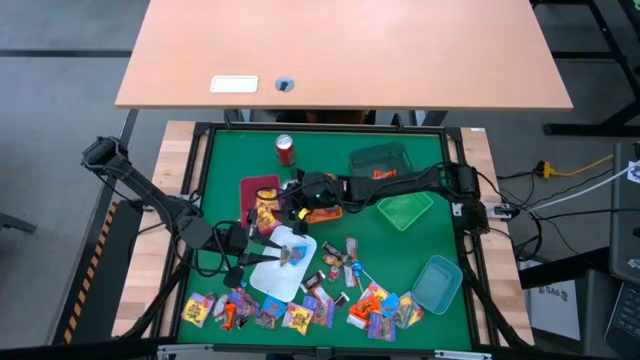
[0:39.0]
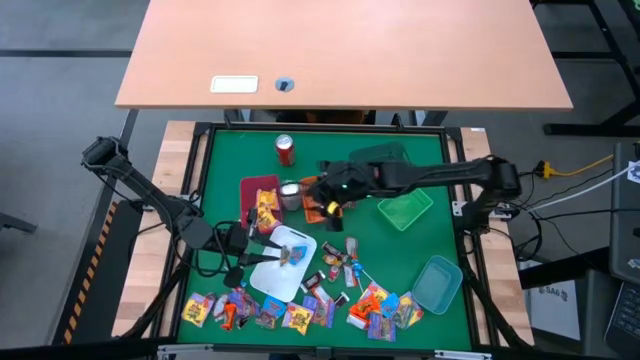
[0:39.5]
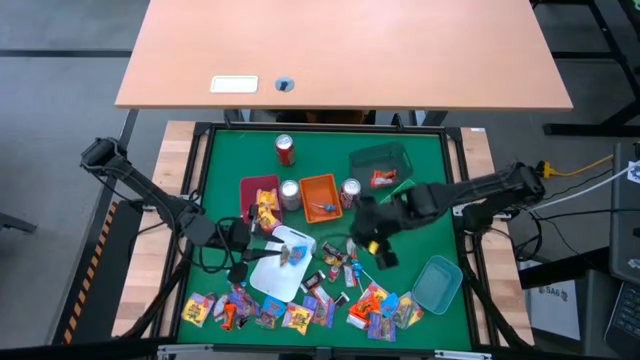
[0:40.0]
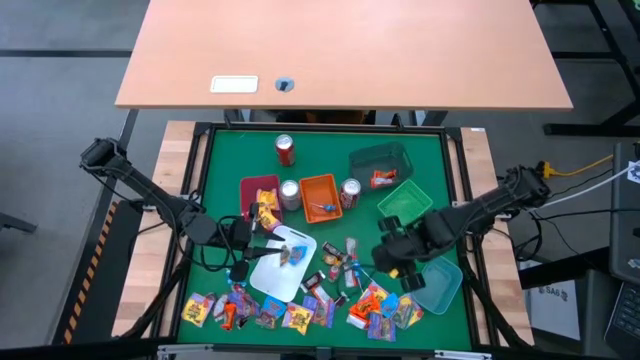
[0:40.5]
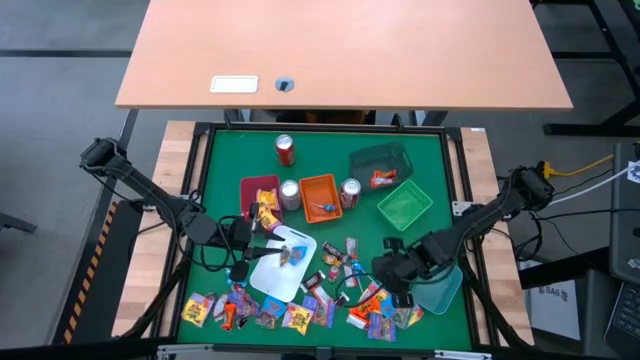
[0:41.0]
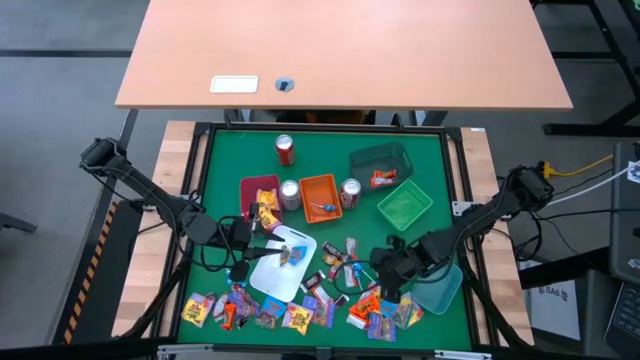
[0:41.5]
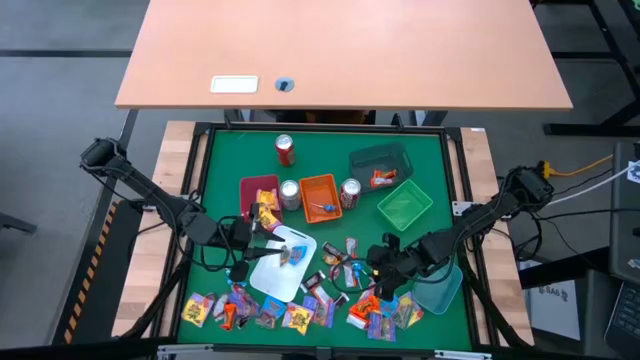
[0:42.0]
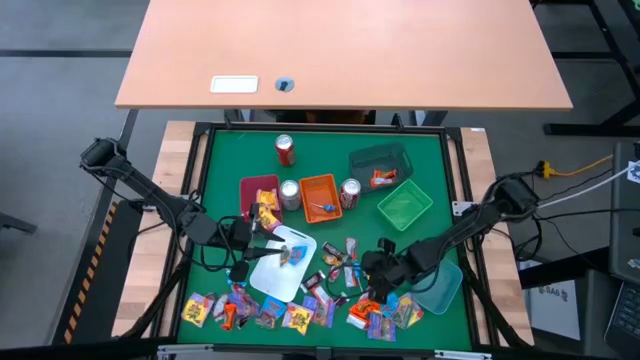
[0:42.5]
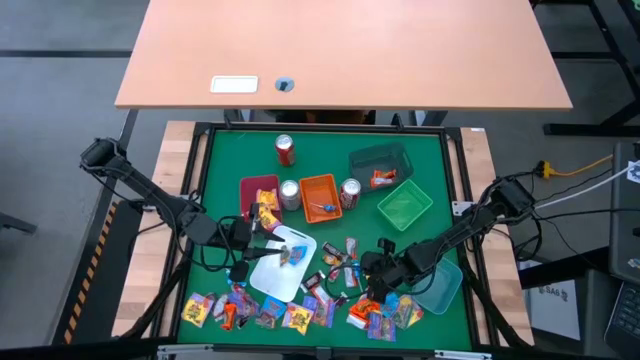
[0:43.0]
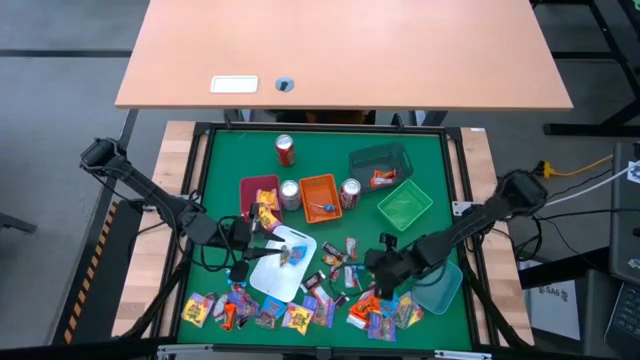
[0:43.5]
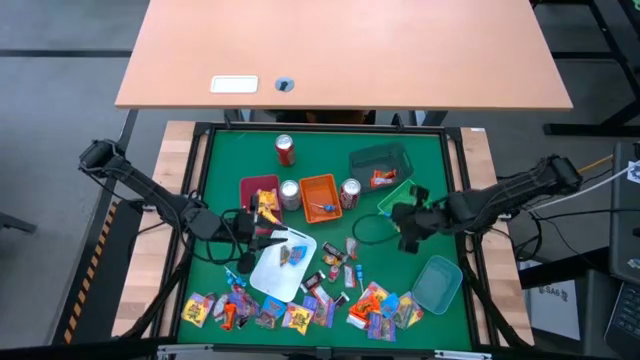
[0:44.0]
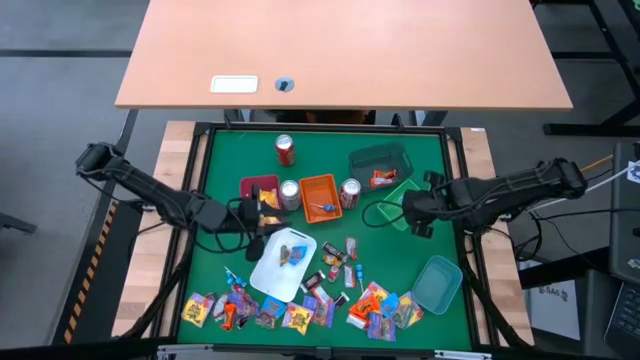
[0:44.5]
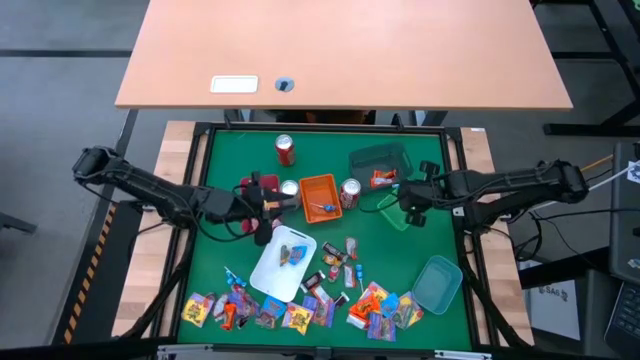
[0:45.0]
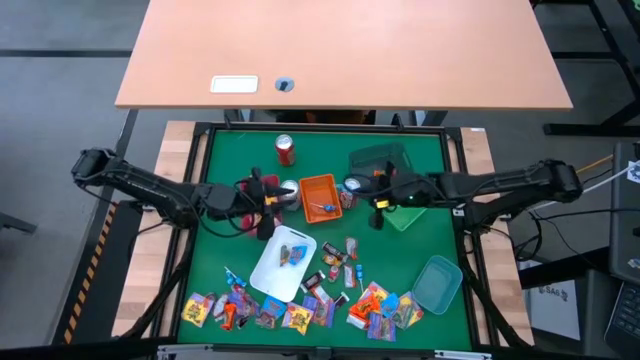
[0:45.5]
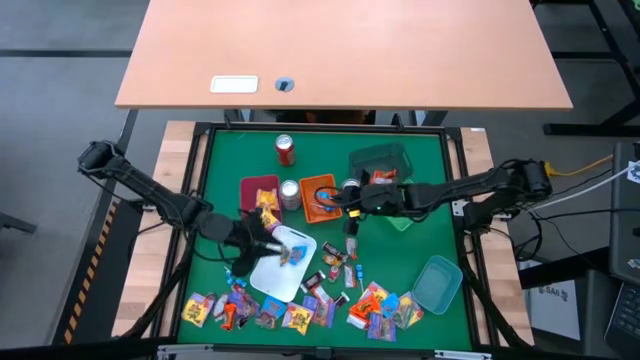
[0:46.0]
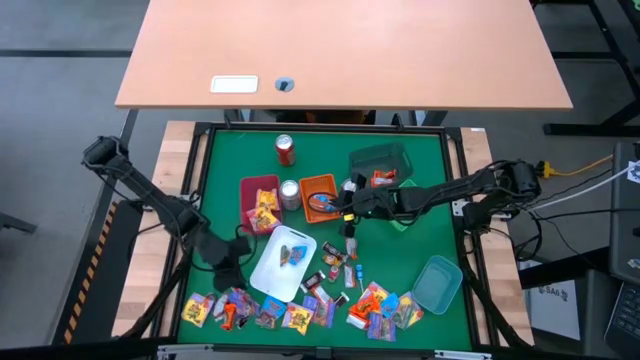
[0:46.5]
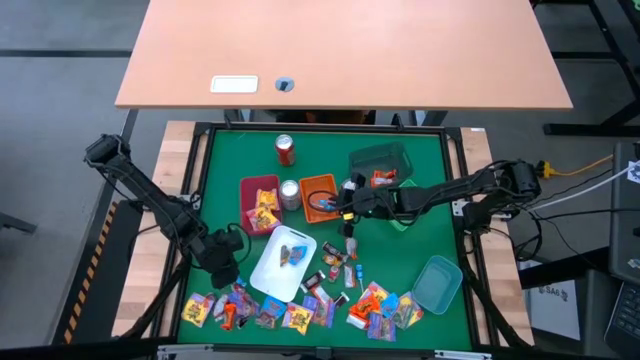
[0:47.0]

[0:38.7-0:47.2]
Task: Sort candy
Put the blue lollipop into the orange bin

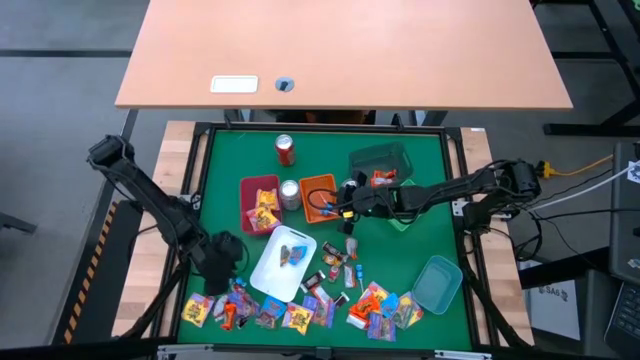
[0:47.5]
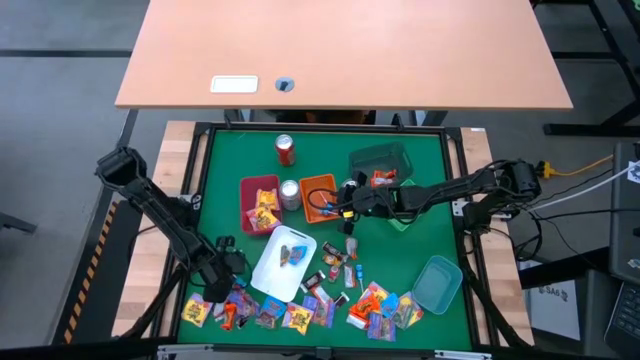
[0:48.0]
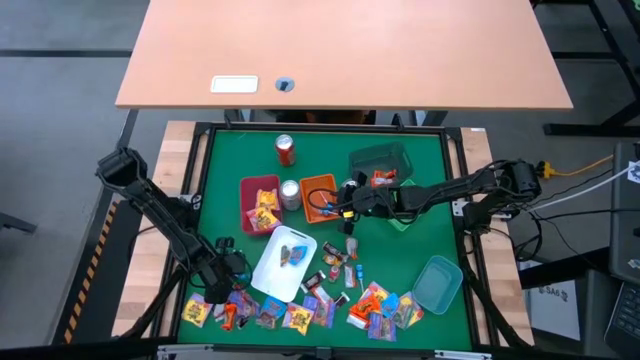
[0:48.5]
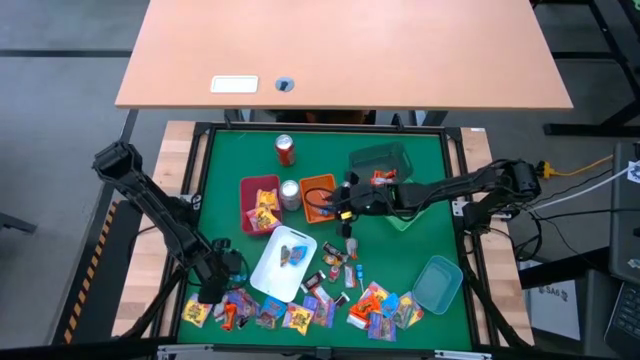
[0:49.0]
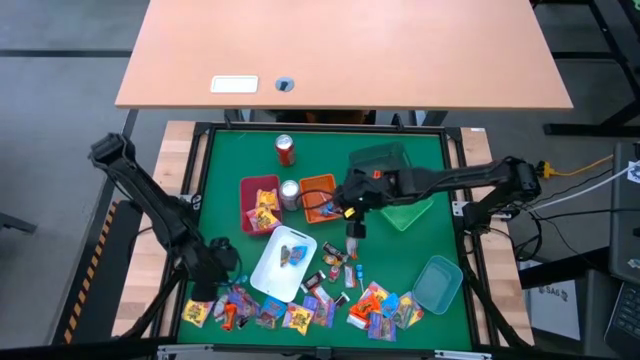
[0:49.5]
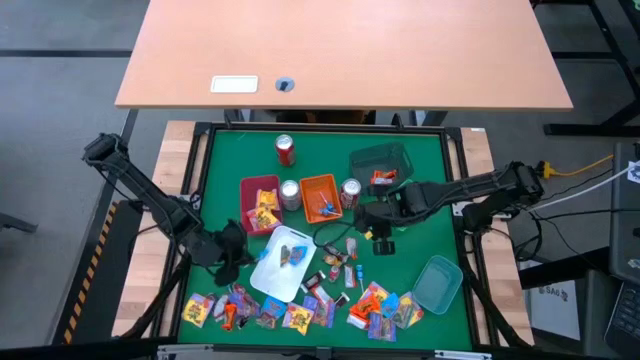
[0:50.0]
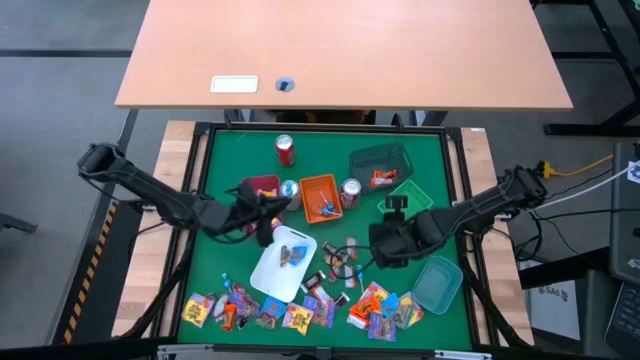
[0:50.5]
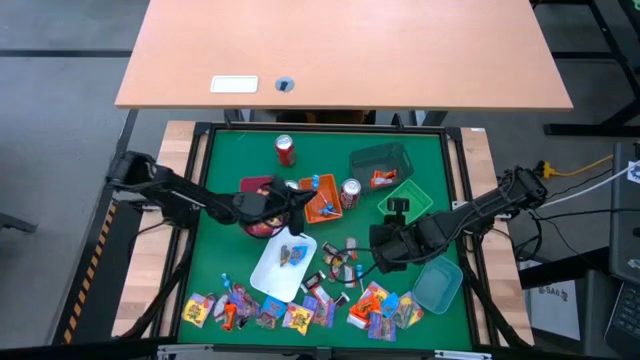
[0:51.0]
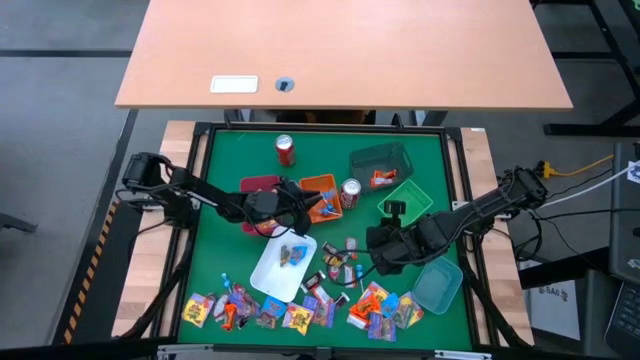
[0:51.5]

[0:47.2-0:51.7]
Put the blue lollipop into the orange bin

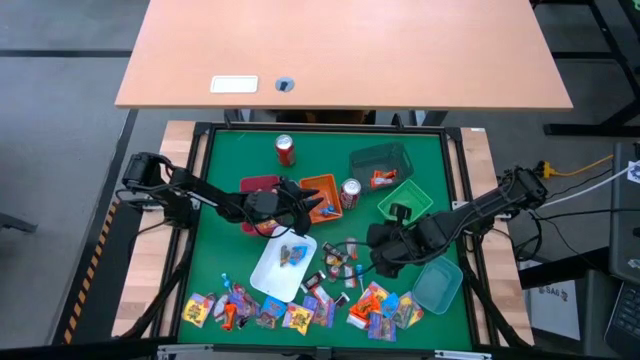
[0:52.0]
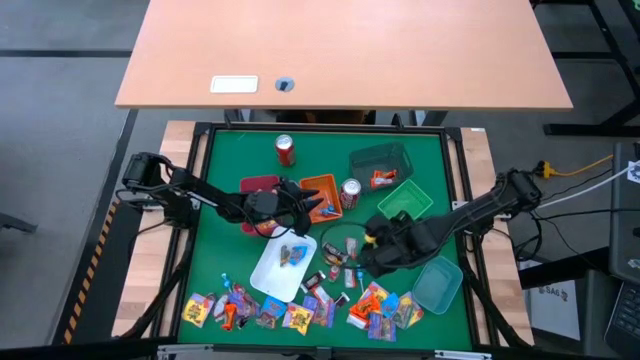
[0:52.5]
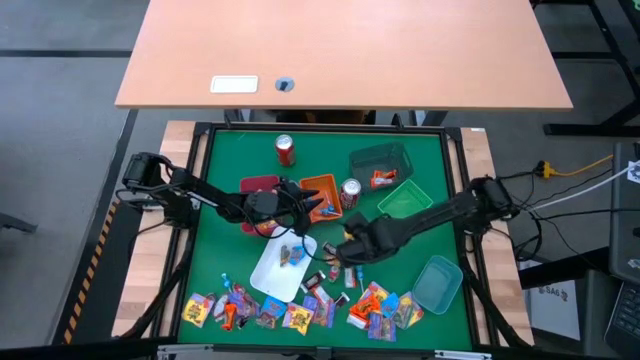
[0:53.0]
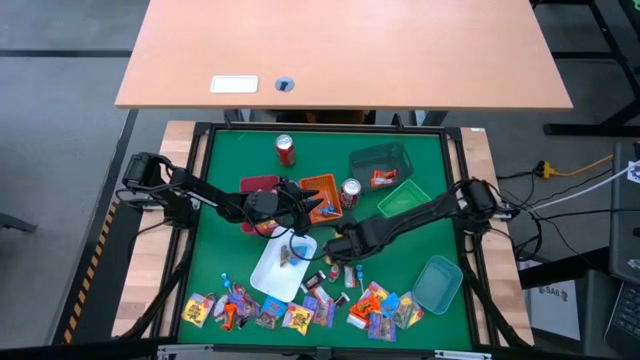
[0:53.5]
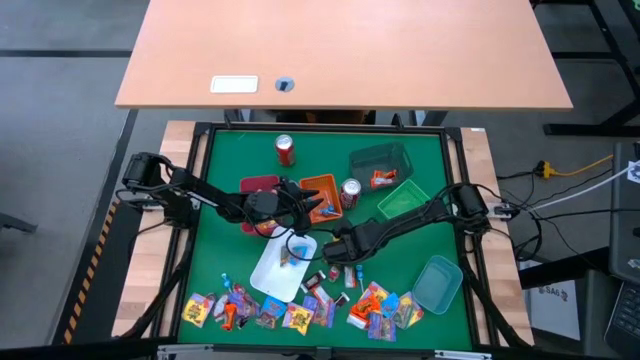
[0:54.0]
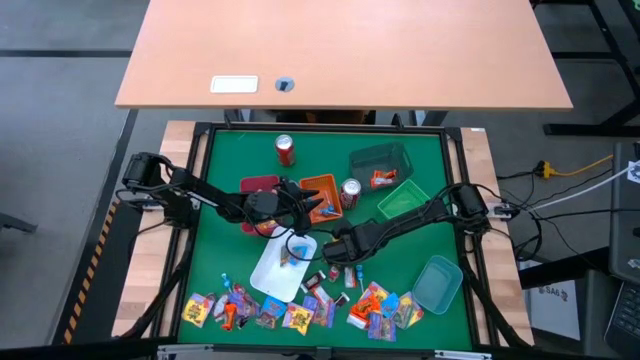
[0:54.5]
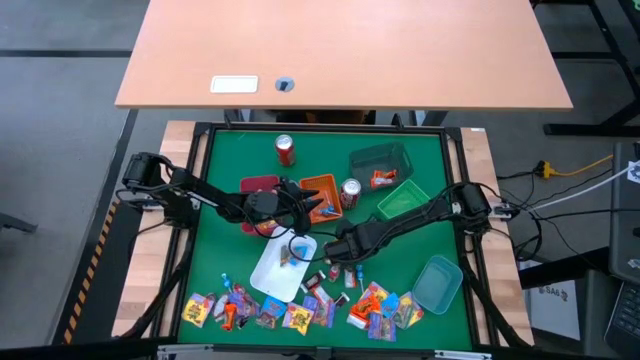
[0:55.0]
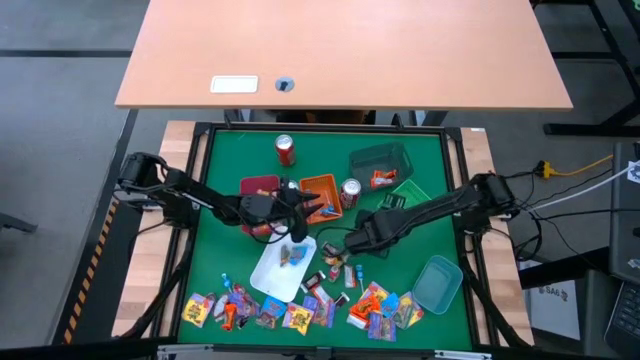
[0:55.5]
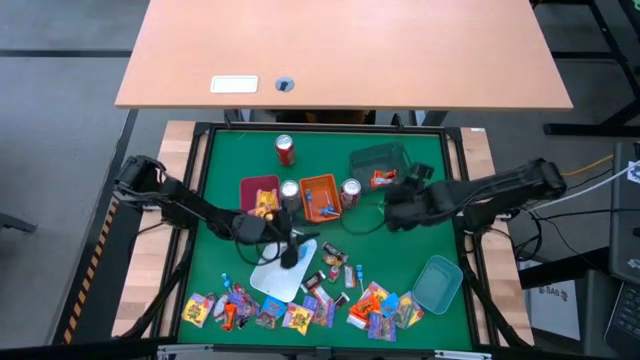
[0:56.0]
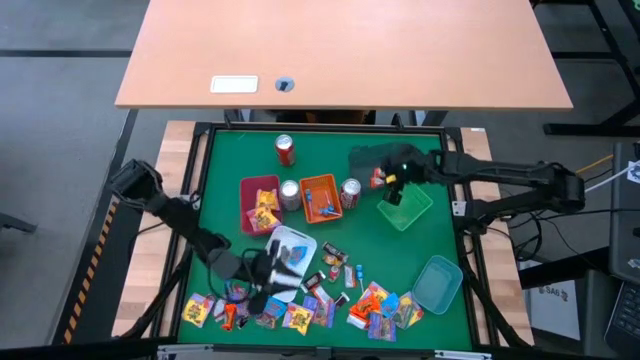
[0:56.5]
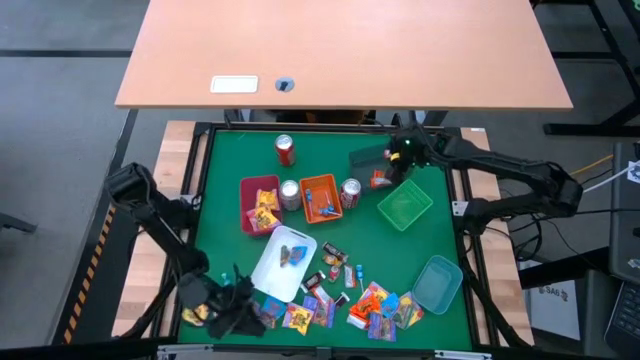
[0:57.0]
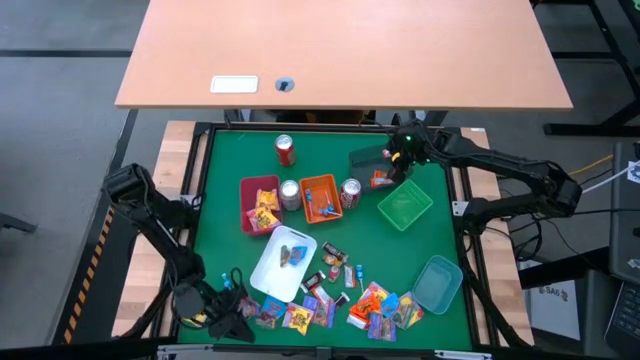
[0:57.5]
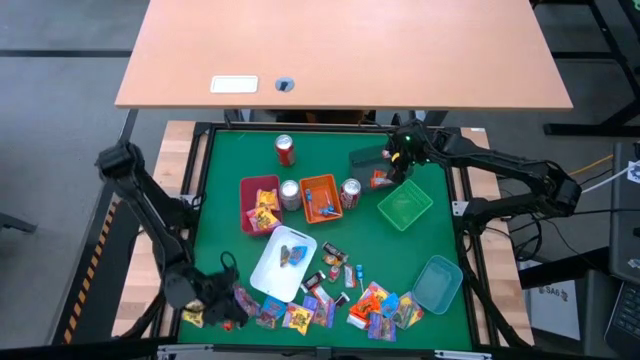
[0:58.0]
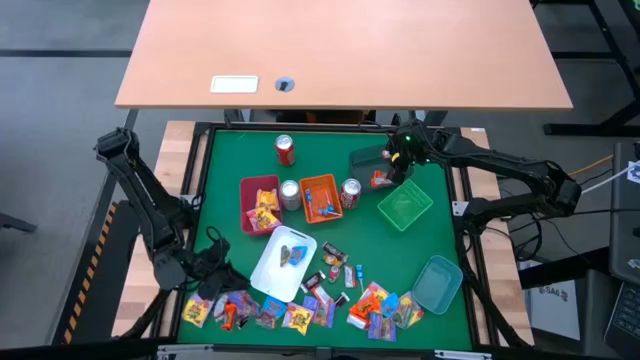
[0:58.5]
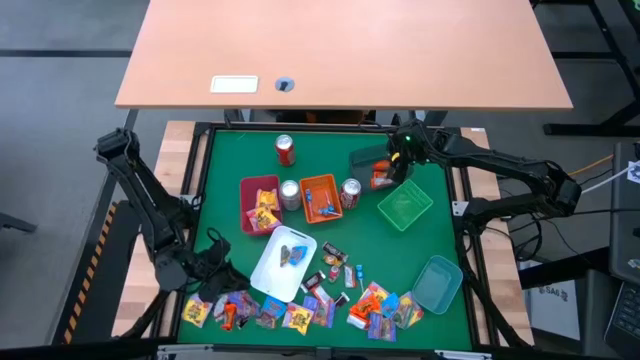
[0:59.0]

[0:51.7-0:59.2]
Put the orange candy bar into the black bin

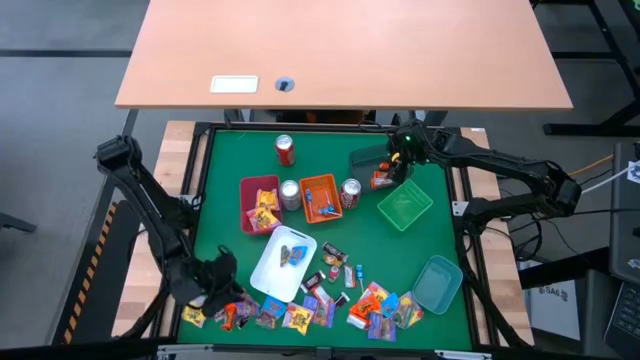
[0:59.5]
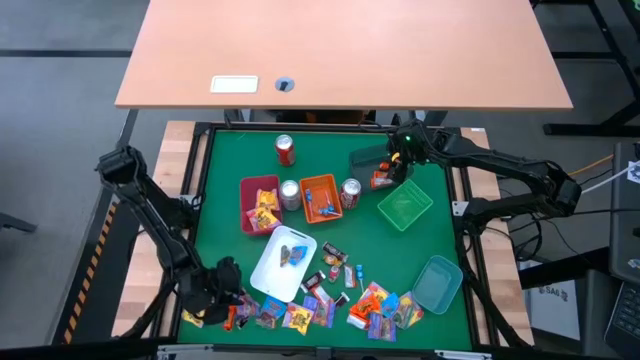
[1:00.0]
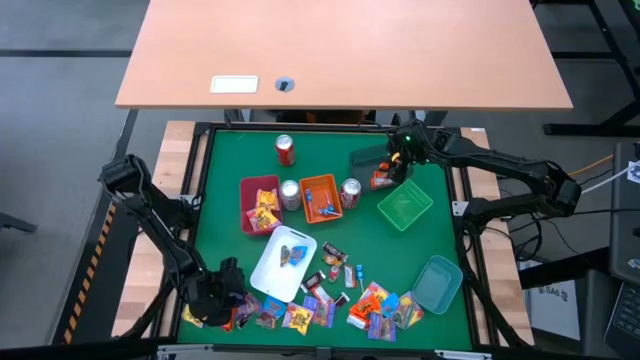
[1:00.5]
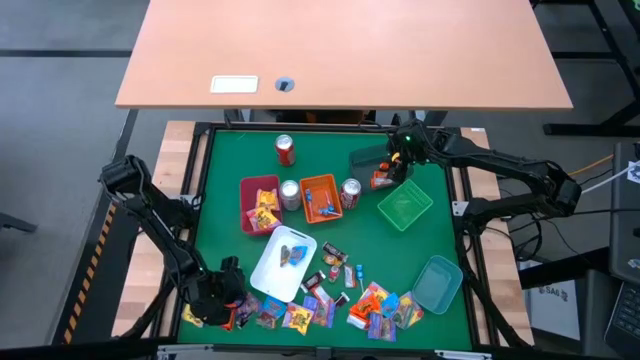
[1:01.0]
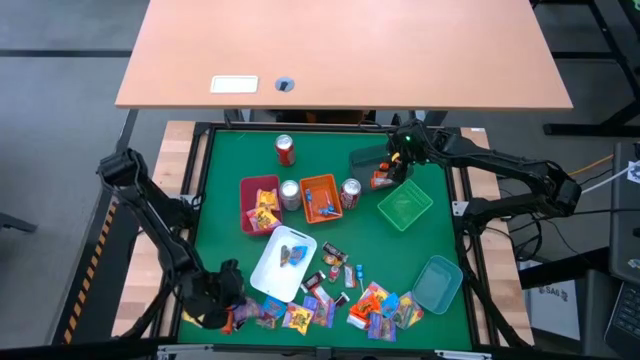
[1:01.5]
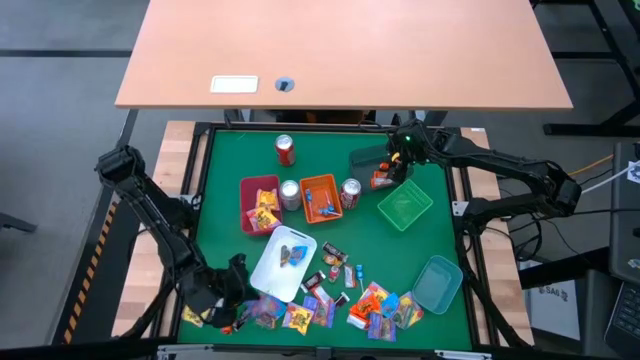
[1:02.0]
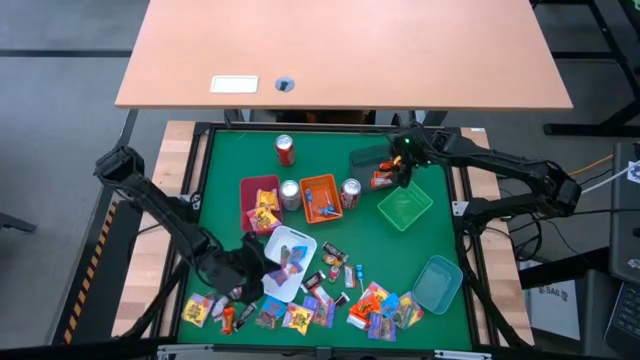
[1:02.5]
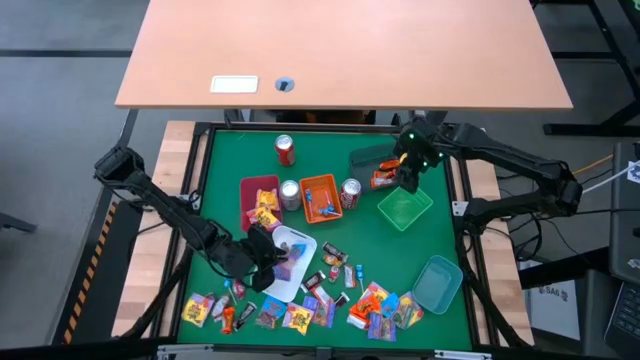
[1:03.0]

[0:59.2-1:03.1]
Put the purple gummy into the white bin
